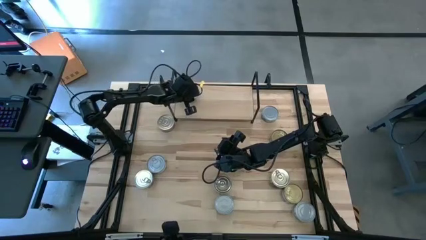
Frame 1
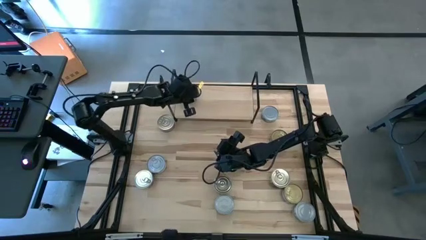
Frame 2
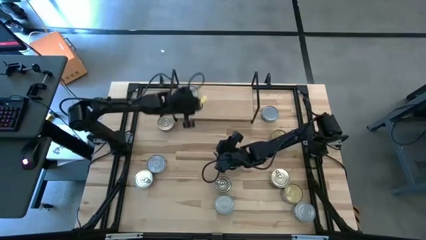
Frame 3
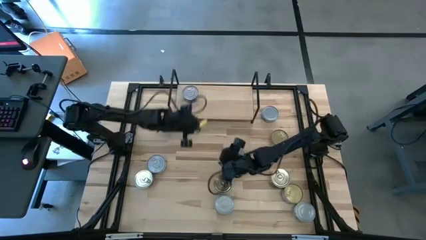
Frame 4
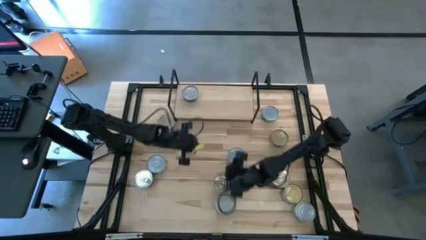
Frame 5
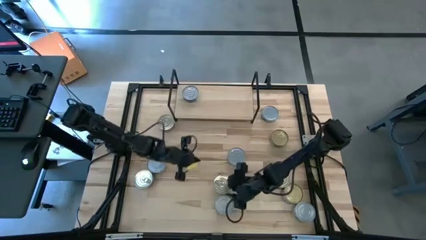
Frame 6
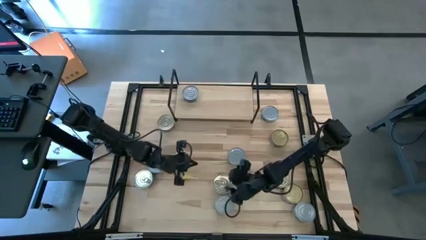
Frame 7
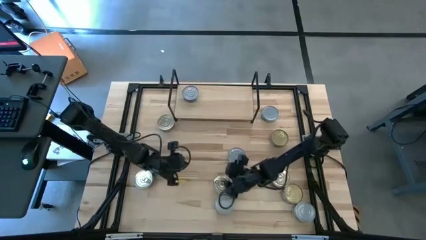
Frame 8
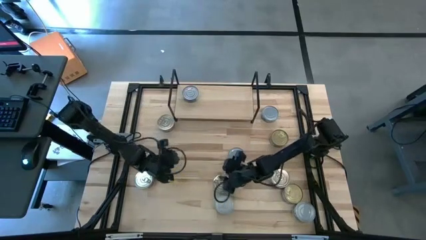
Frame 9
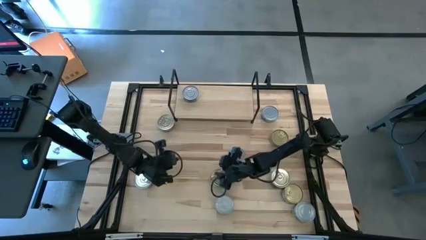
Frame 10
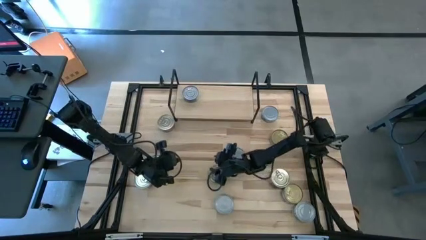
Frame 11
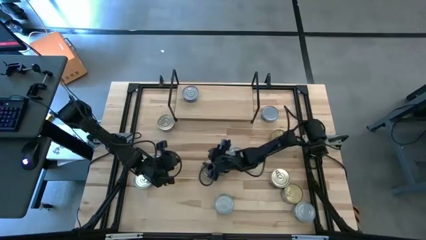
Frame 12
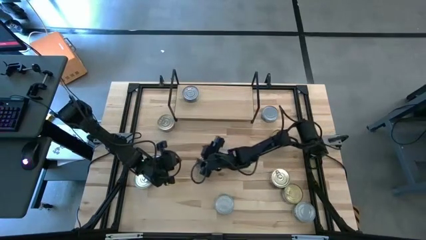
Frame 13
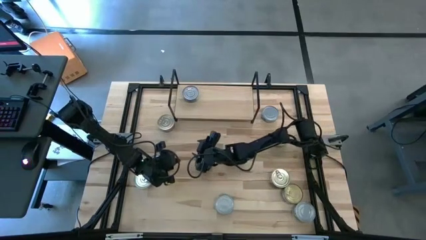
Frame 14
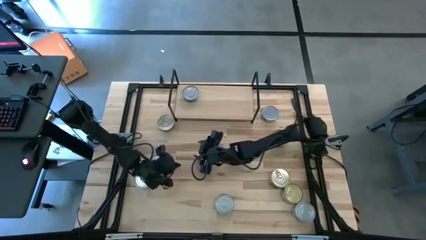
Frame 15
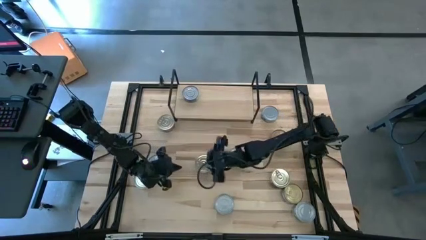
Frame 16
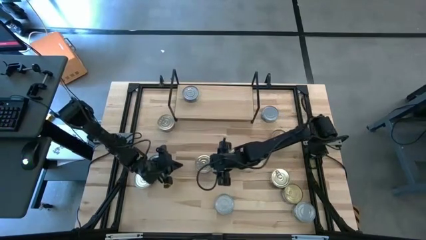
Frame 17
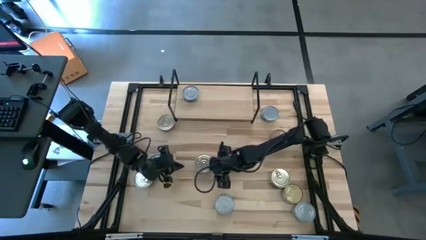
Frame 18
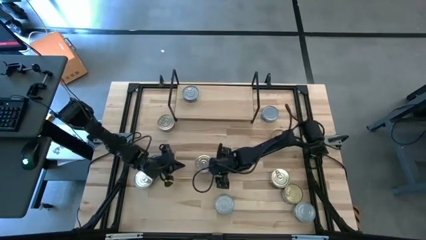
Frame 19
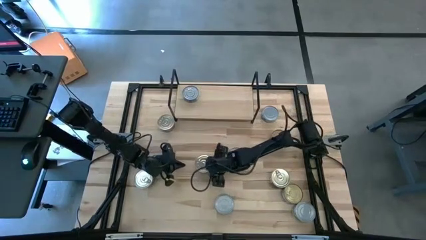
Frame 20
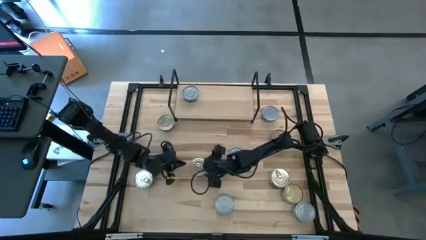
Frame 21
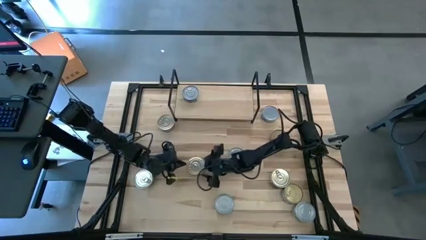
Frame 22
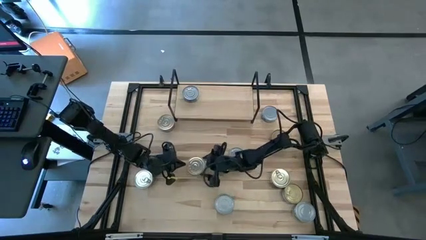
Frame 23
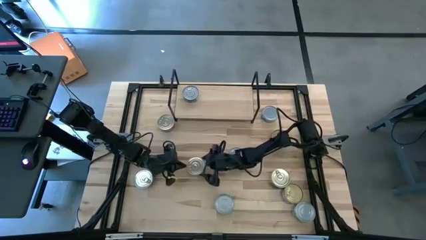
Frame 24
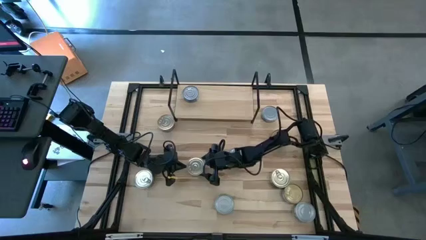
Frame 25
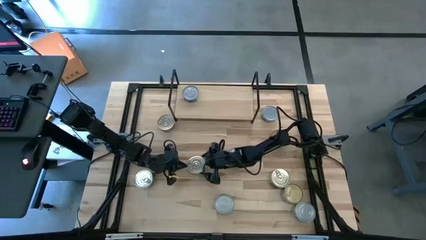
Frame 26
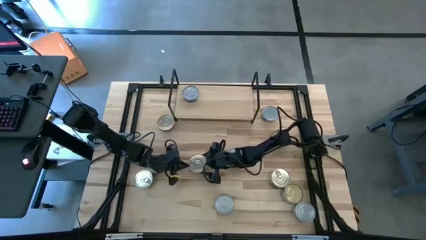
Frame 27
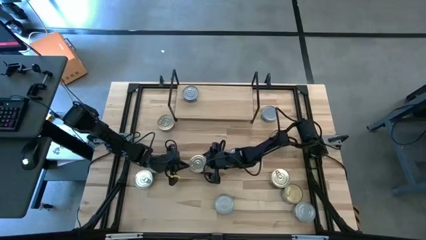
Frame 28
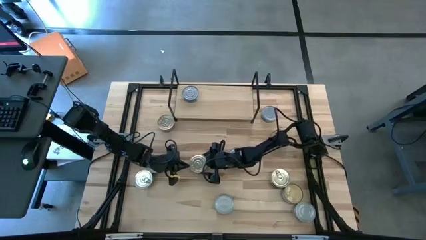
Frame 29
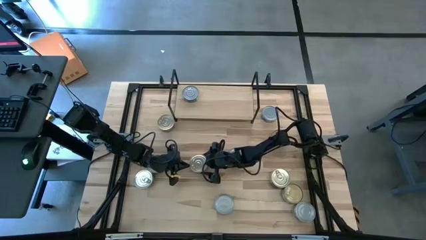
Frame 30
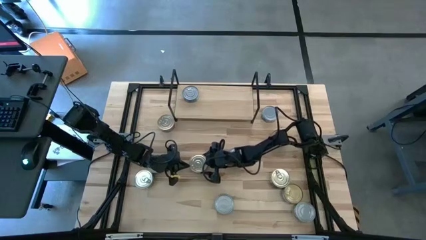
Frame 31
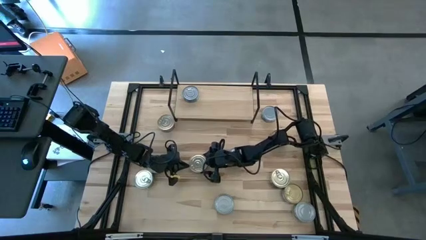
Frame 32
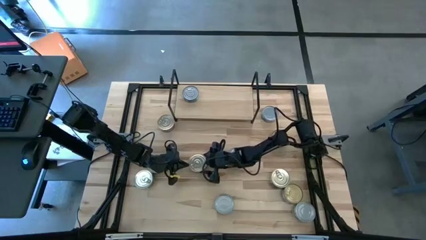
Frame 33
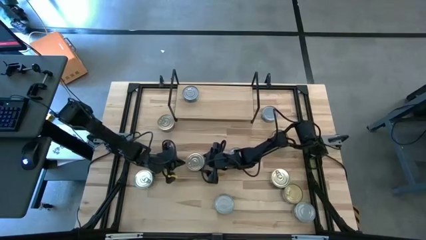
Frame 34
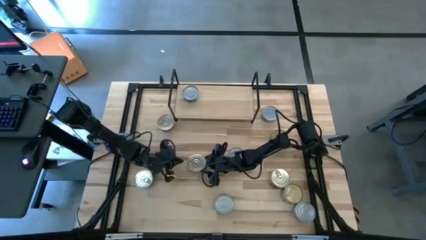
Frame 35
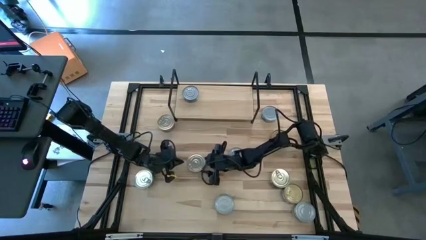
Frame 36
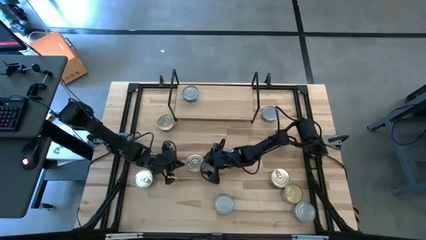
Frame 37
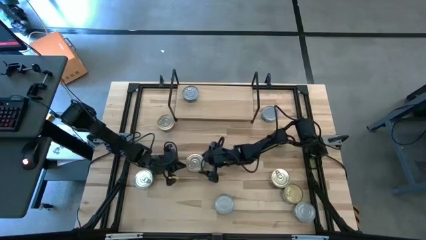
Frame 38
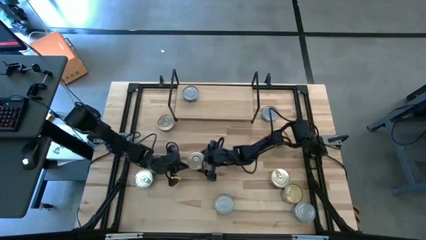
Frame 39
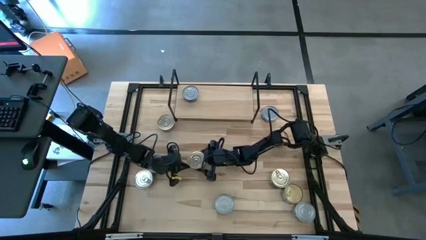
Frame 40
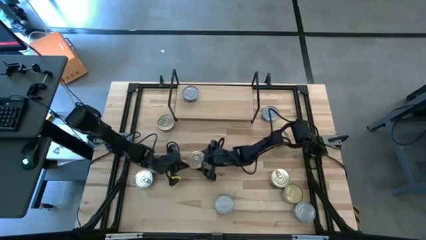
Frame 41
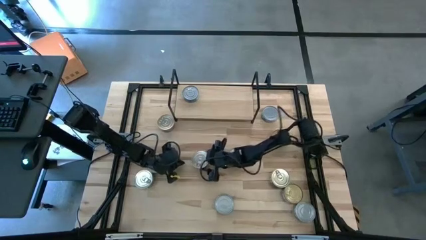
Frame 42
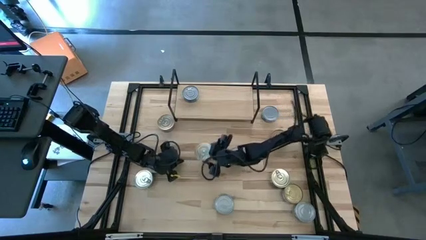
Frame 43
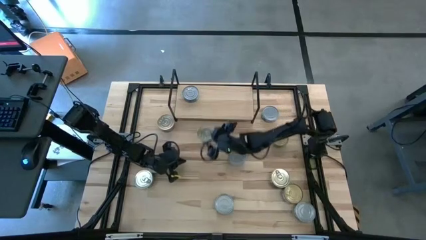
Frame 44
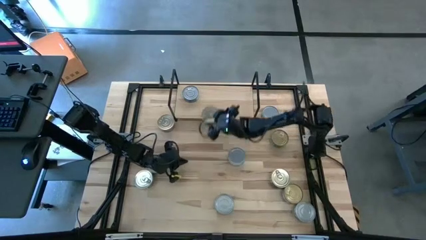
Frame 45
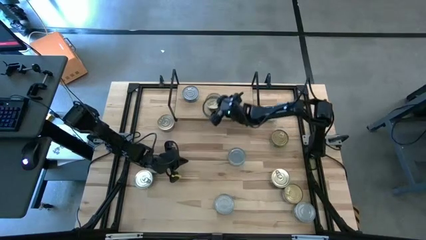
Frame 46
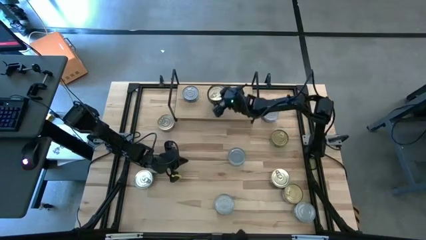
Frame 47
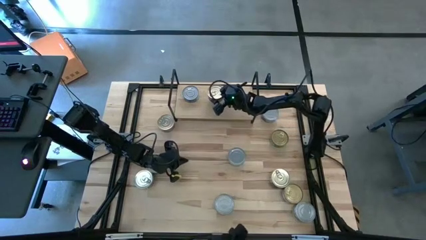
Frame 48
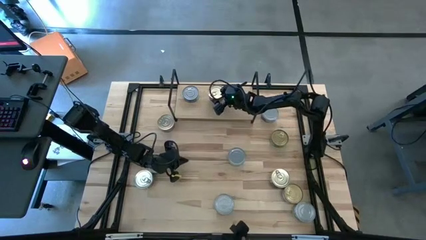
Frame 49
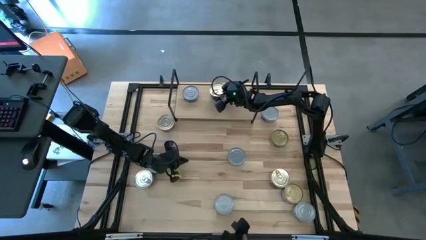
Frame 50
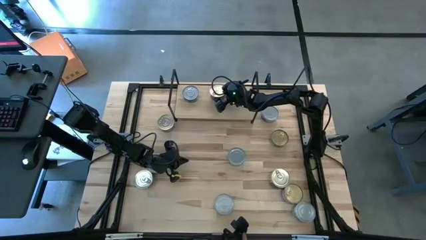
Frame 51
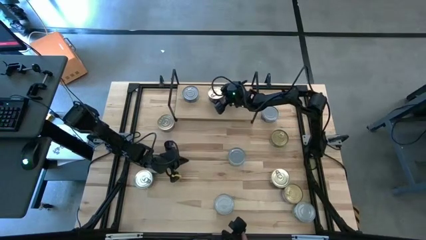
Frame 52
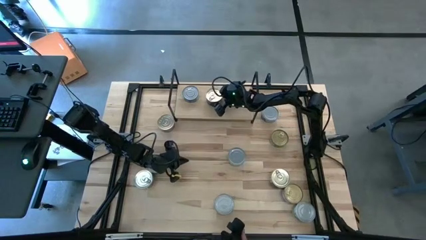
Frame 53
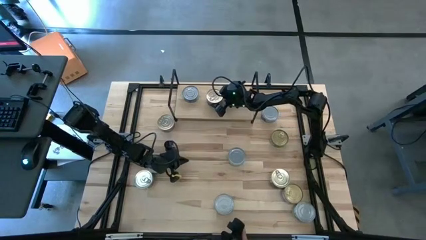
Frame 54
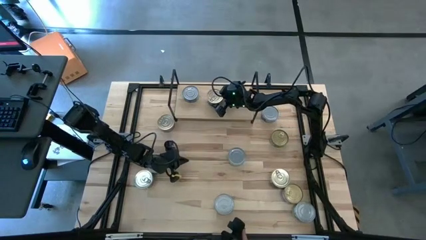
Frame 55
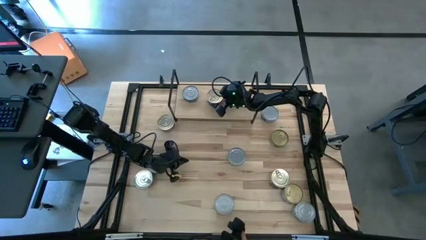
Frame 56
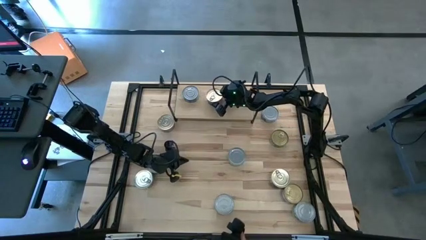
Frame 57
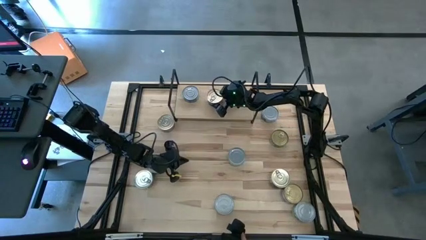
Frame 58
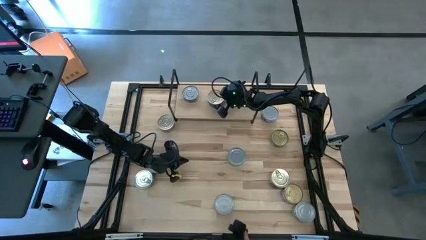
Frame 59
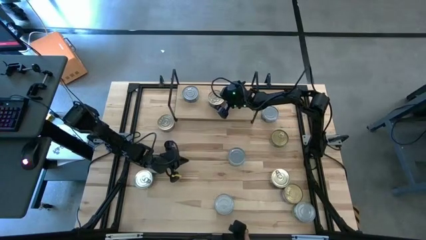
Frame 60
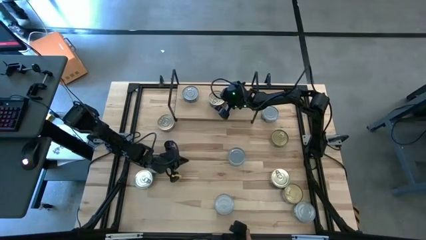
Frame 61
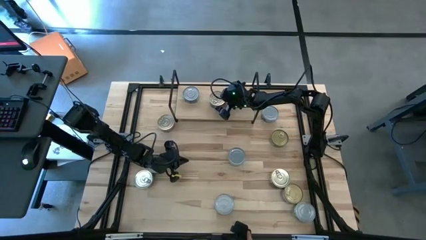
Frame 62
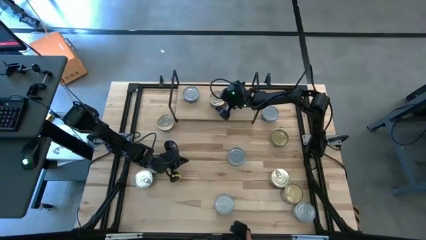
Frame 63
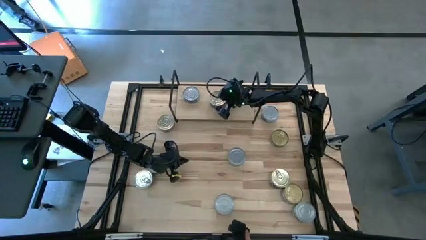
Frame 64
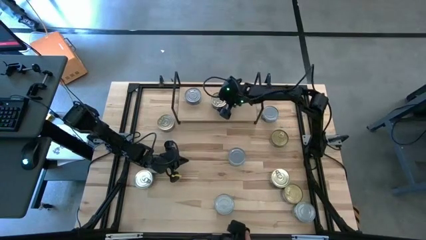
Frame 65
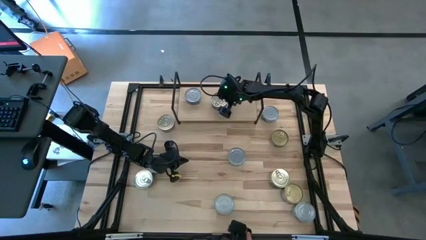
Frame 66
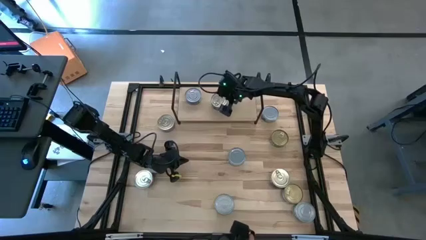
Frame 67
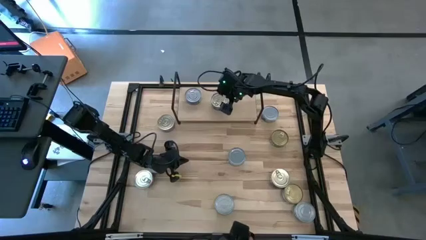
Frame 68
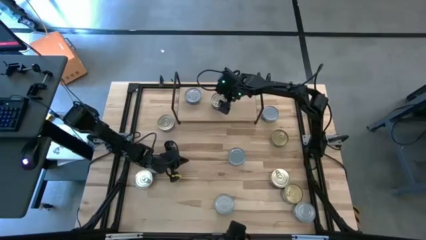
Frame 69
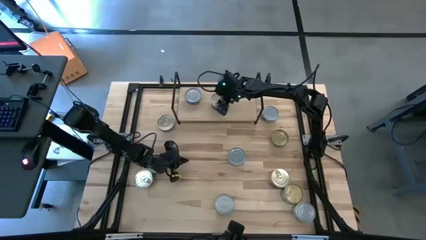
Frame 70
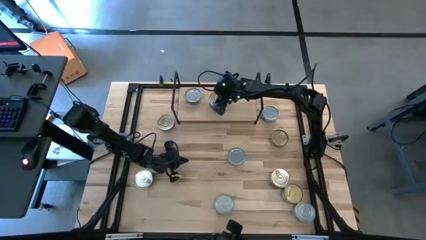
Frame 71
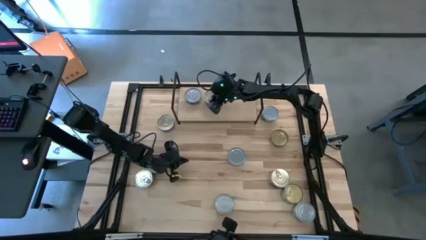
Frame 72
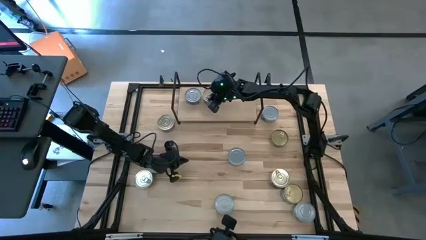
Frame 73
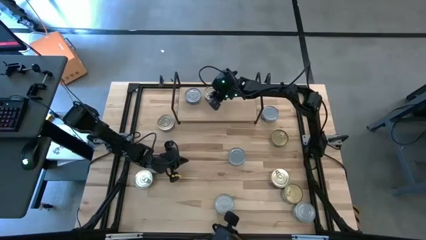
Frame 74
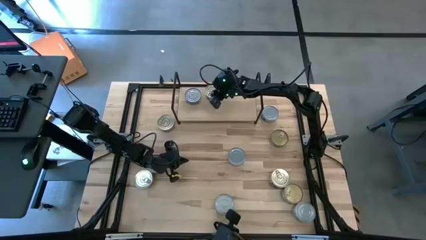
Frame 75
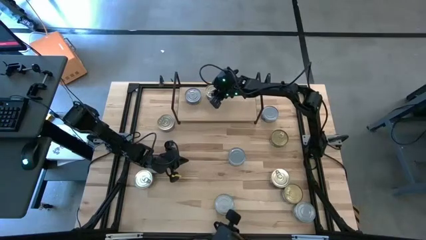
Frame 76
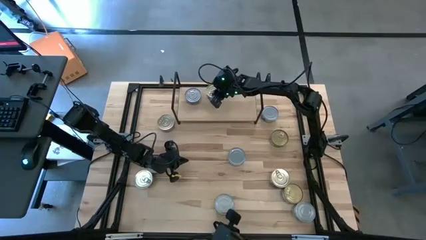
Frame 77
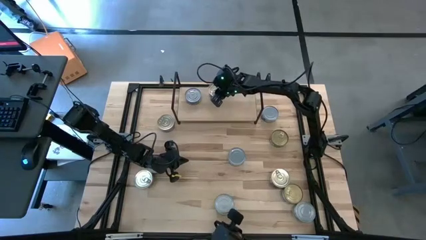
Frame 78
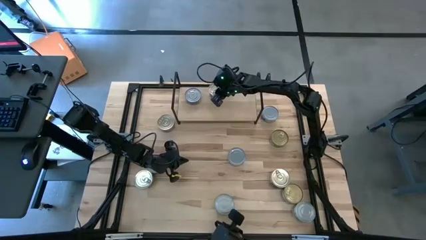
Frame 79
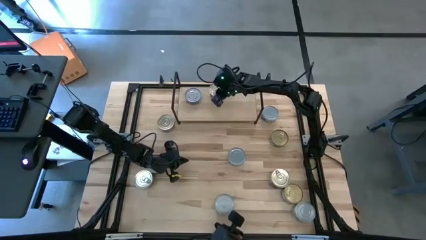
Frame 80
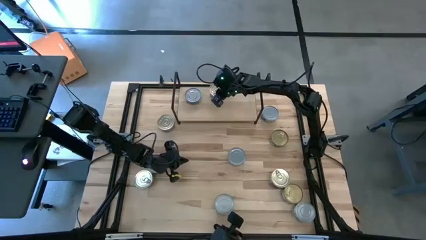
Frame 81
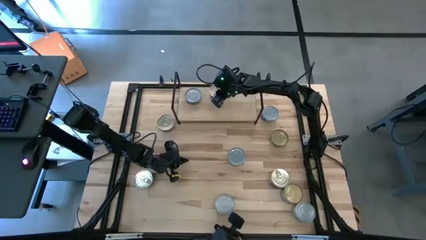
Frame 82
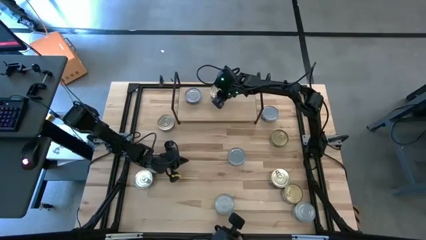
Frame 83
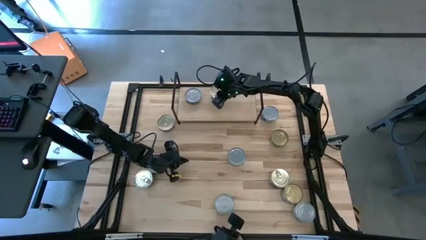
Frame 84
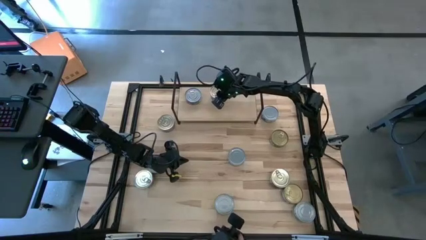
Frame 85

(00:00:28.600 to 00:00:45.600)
Task: Stack canned seafood by type on shelf
Put the center blue tuna can on the shelf
